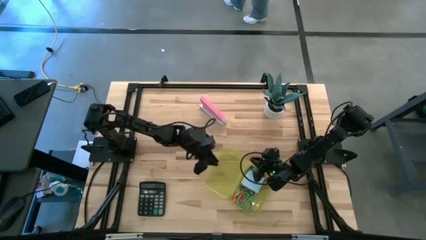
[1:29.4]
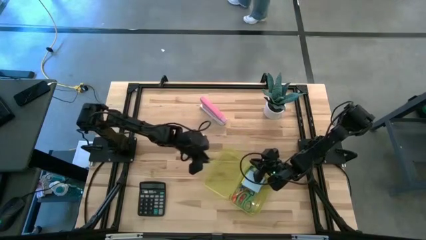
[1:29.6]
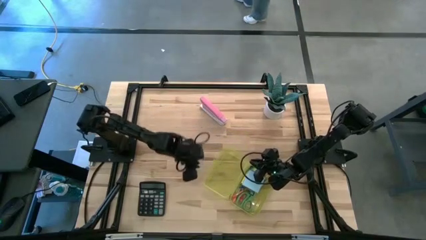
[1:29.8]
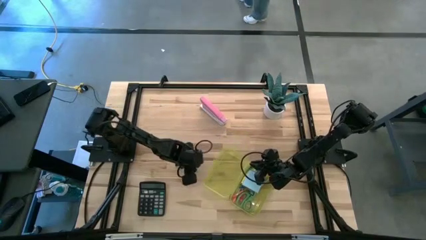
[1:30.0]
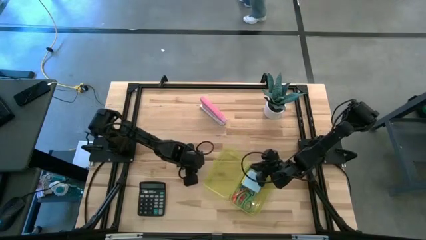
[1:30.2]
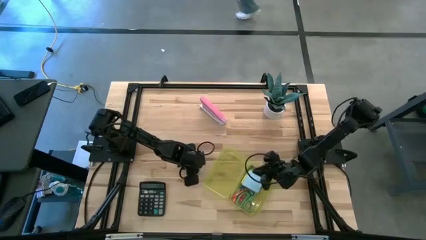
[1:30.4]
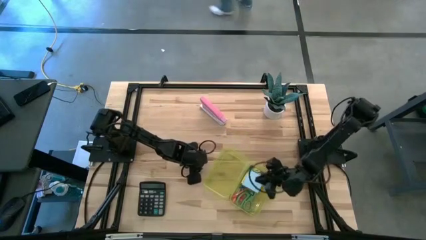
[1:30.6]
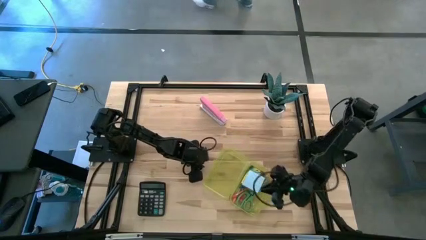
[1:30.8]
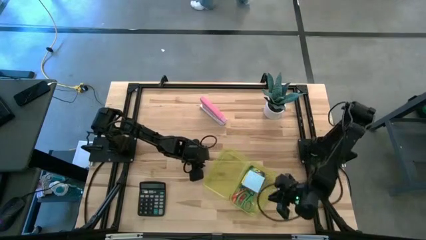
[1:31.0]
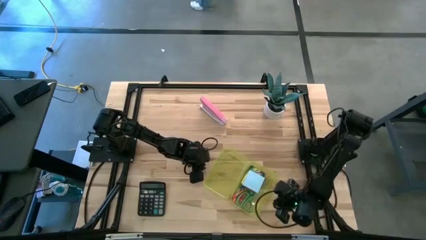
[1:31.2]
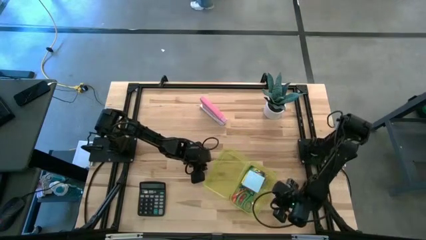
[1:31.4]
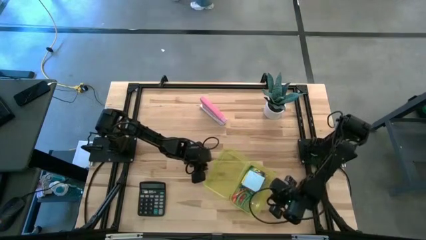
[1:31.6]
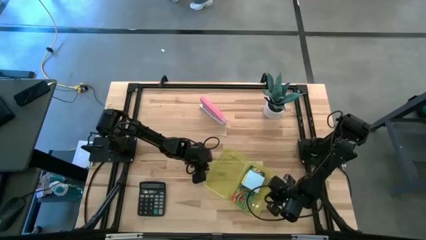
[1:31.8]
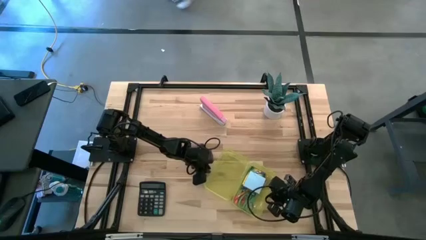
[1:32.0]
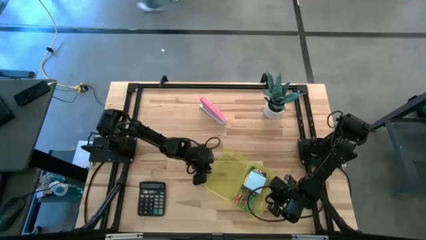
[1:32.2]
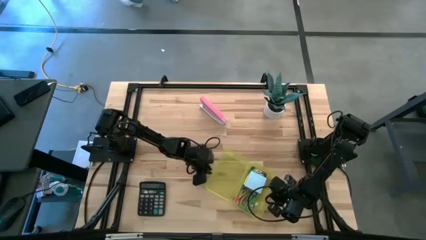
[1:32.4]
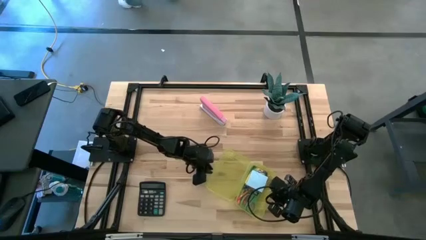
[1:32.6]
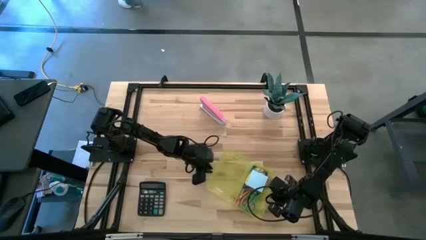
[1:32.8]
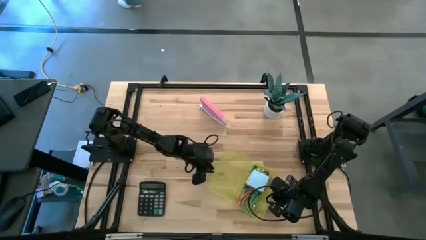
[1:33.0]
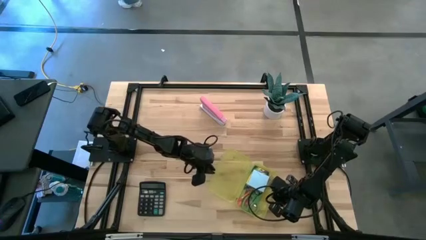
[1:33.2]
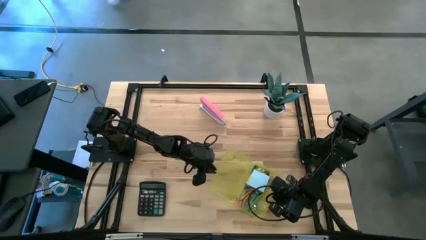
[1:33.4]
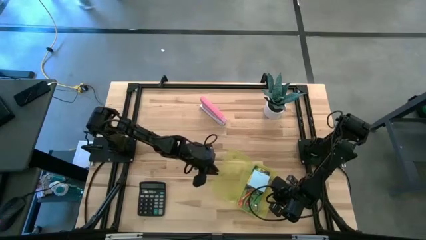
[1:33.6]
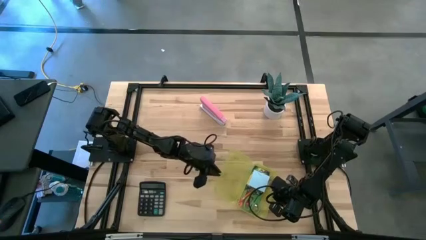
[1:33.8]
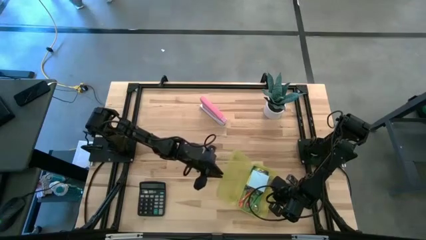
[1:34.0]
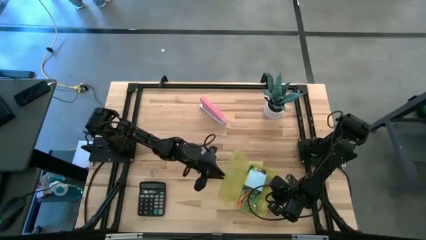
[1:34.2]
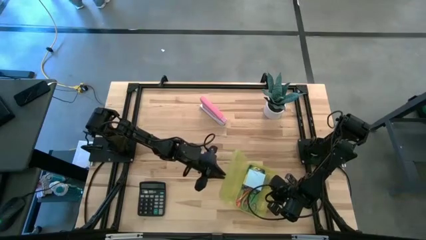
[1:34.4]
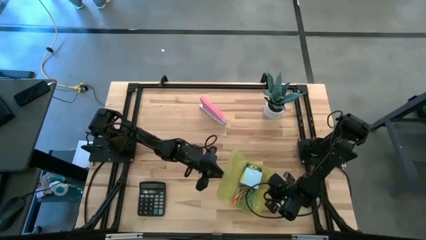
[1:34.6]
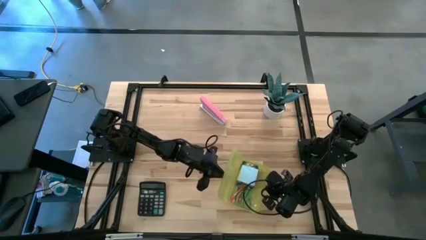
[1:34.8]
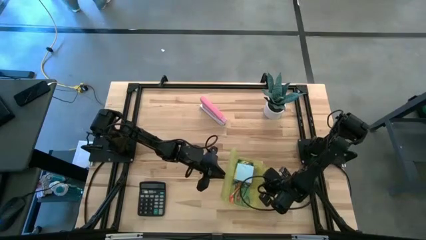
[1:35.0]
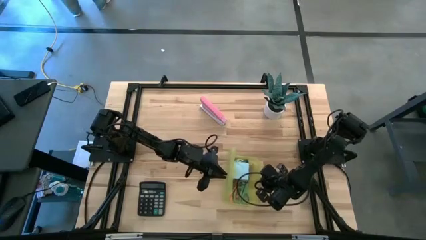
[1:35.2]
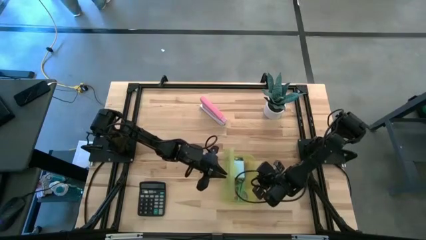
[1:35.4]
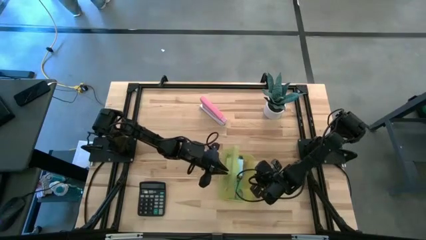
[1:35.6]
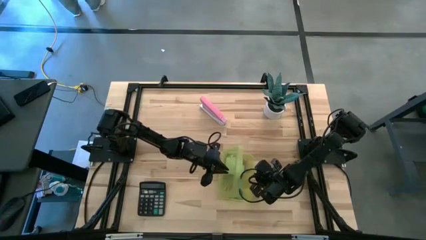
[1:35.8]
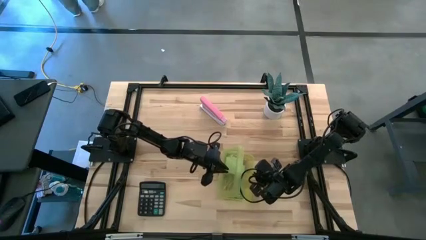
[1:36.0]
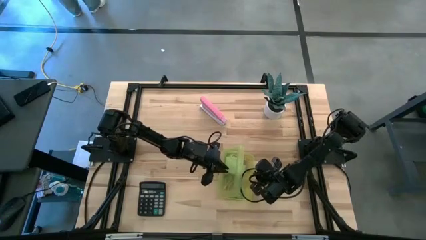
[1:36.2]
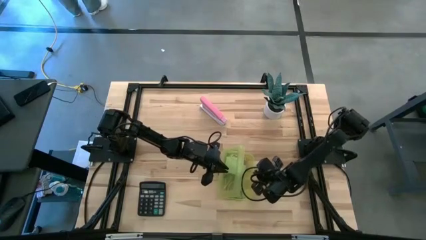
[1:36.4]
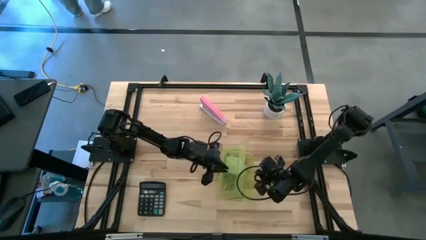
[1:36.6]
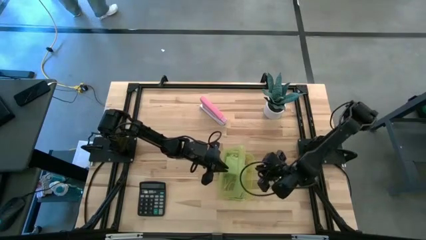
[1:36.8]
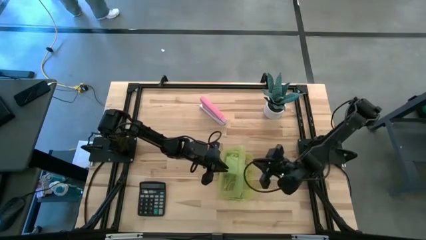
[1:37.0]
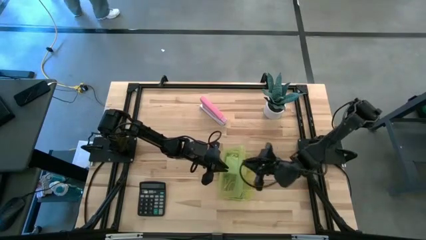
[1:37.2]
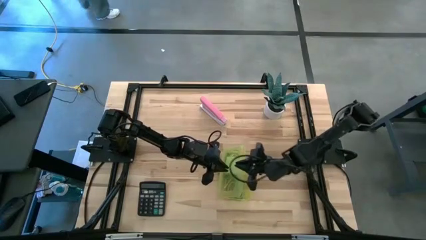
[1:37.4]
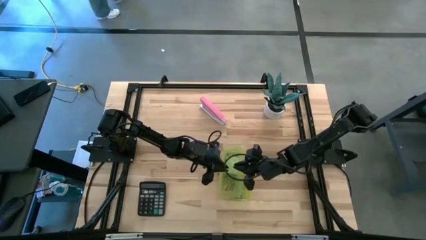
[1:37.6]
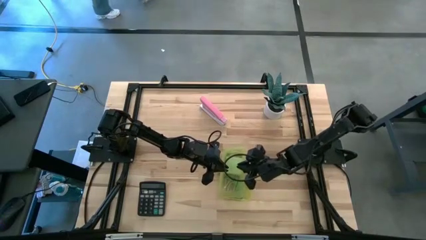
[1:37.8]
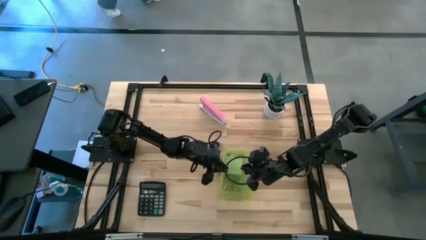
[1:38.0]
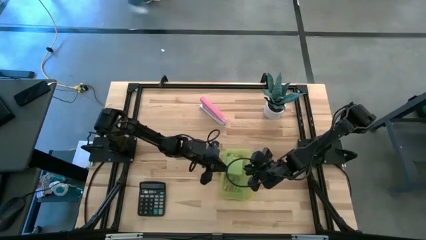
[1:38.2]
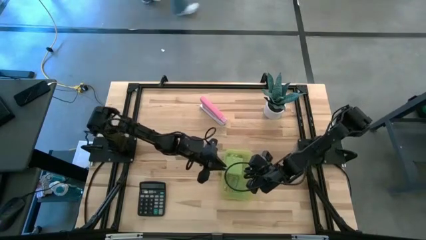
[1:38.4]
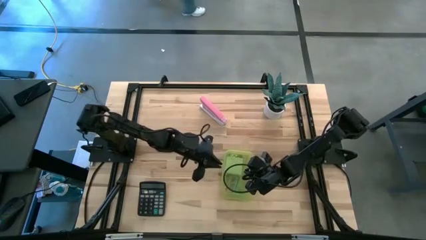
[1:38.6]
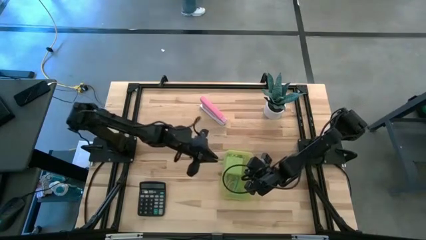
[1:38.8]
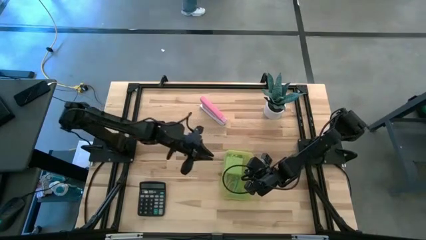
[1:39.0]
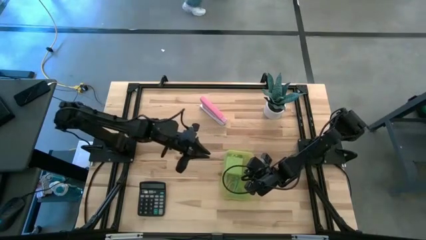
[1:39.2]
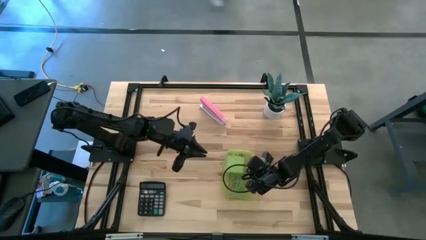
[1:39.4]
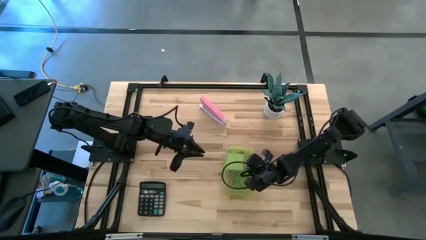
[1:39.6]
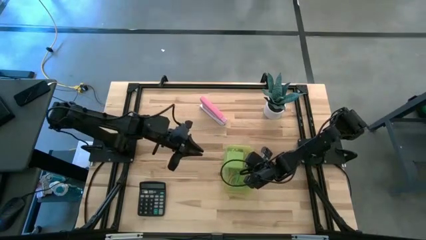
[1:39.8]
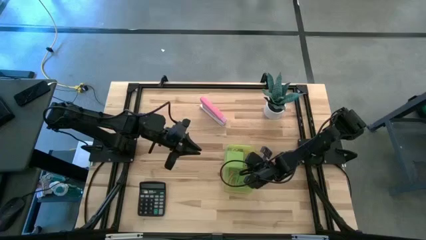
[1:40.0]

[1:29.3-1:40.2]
Task: Pack school essentials
Close the yellow supply box

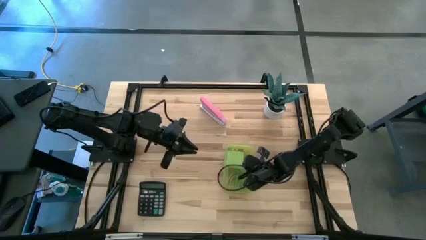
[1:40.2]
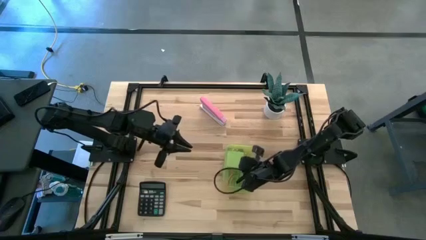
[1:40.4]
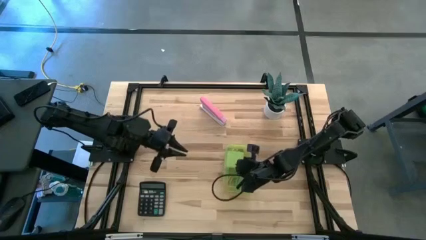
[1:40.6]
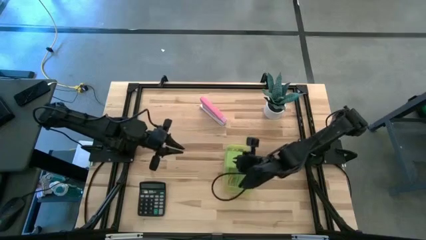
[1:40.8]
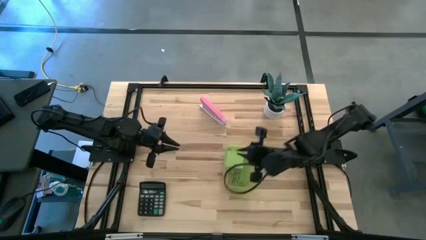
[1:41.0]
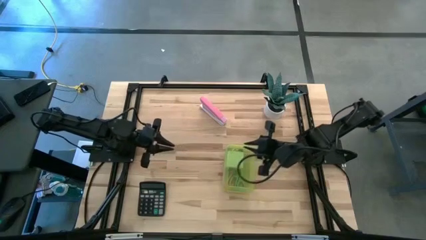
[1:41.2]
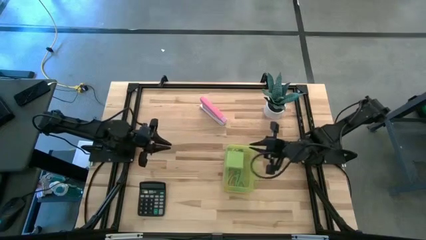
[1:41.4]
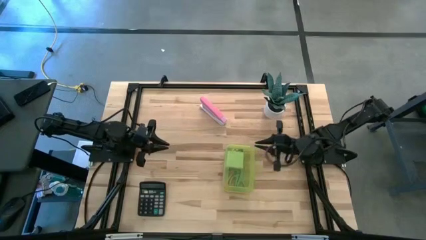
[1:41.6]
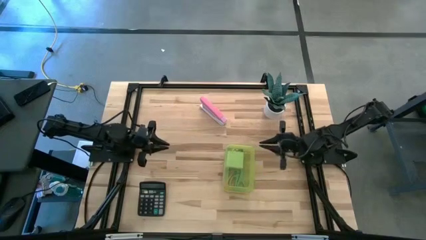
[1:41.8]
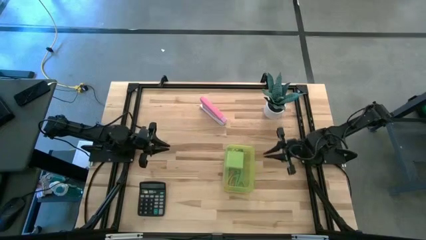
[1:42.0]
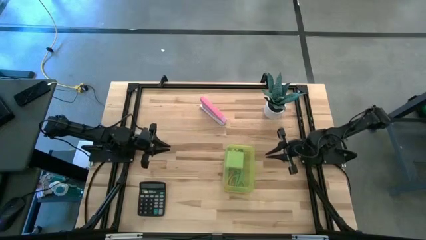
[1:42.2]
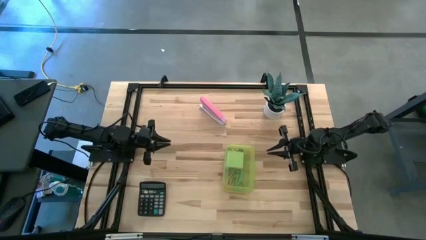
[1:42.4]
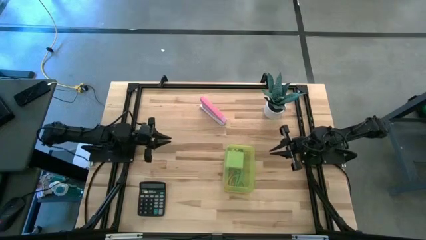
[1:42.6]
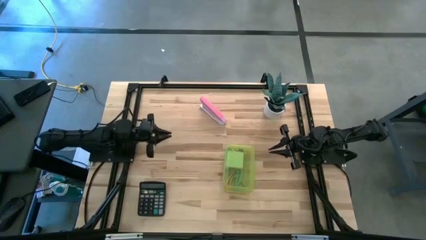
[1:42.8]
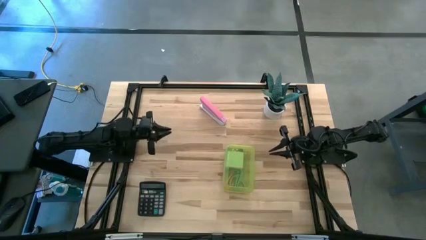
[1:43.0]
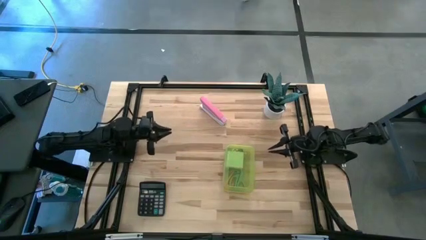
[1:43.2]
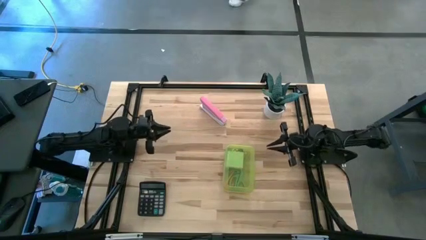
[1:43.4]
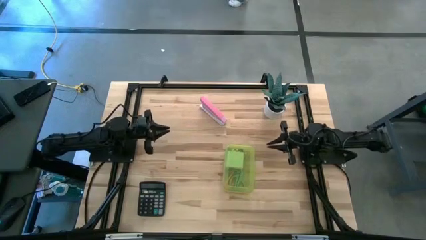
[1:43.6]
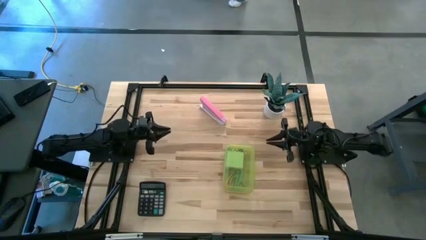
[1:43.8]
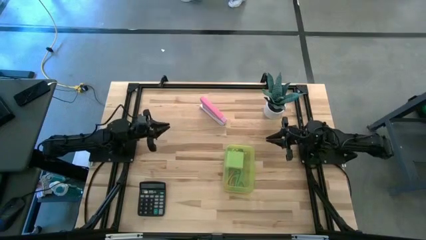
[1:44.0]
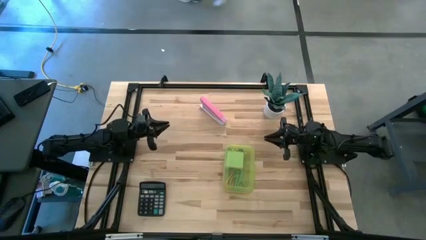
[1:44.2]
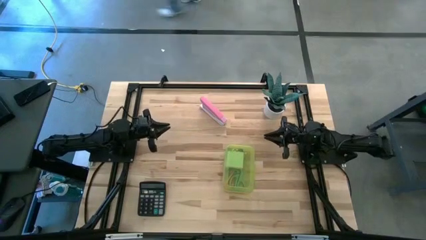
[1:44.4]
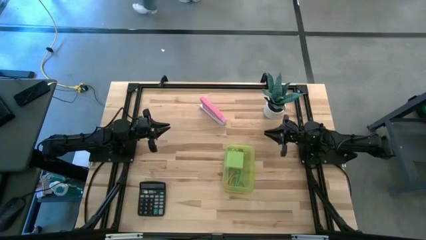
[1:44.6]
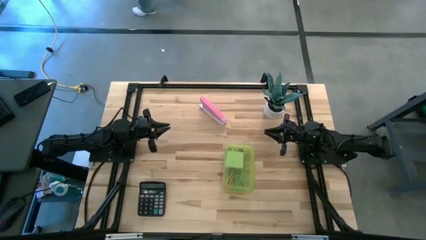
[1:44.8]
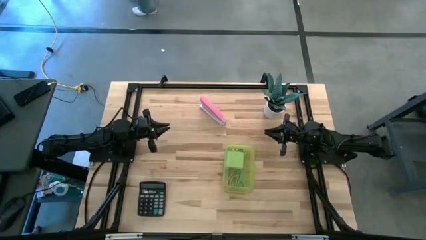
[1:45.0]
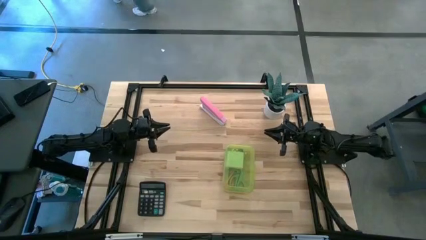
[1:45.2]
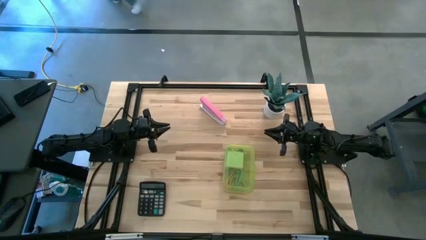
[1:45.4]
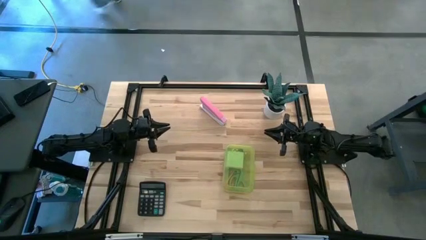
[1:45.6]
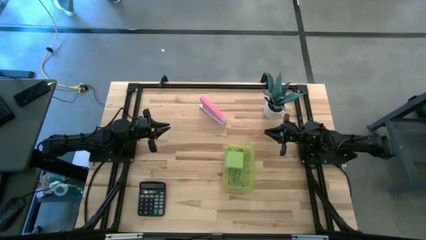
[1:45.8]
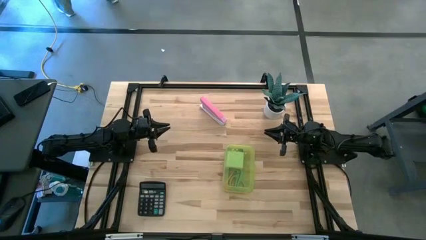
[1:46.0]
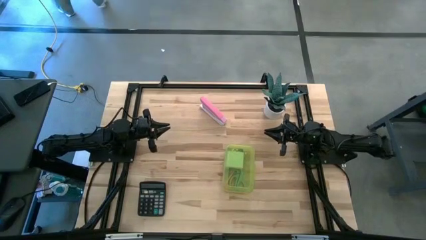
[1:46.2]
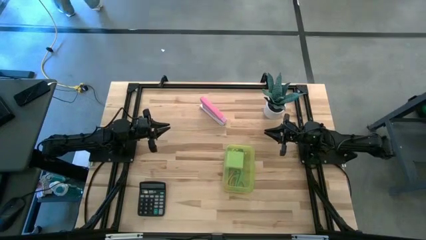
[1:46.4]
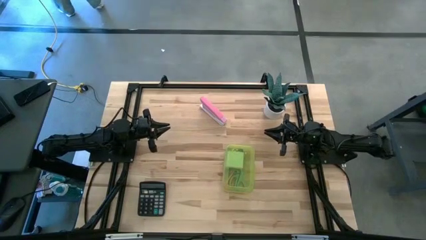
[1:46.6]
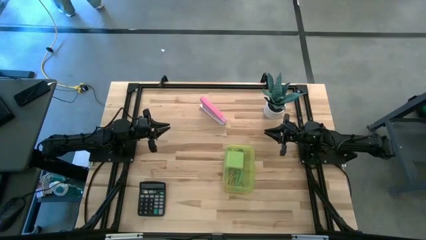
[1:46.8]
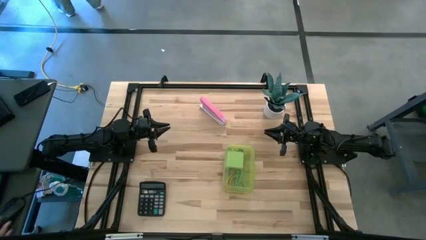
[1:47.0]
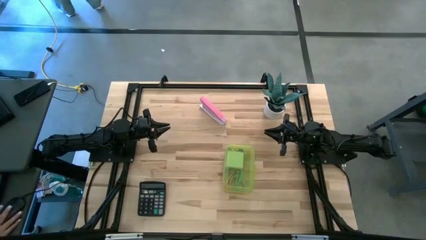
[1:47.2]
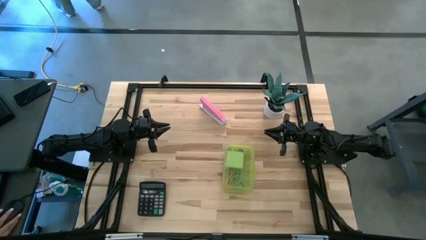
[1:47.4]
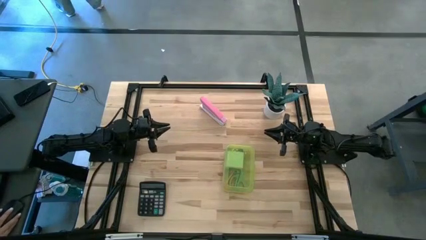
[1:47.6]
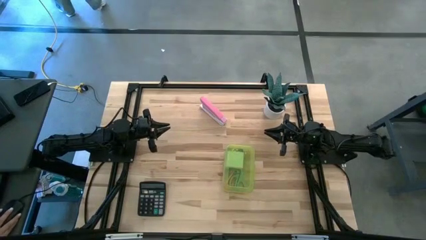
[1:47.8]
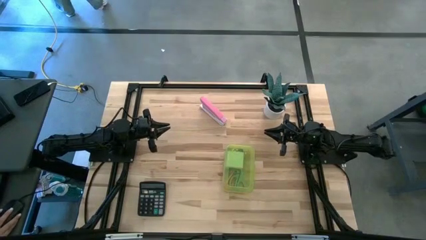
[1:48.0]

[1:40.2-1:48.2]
Return to Home Position
